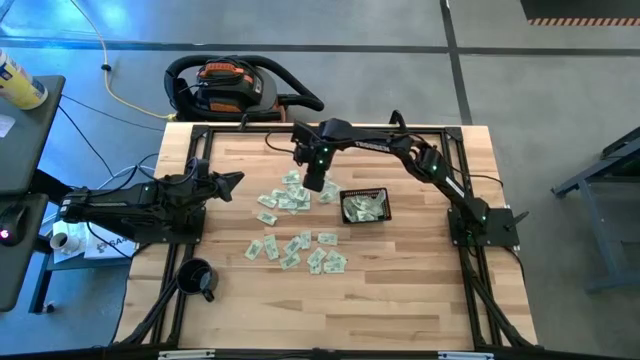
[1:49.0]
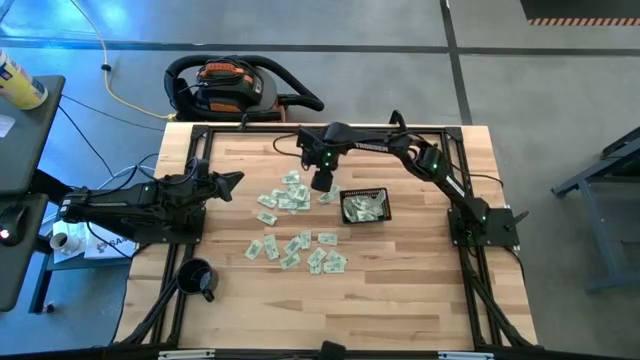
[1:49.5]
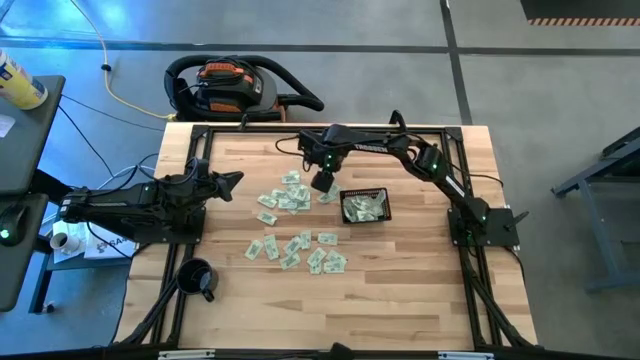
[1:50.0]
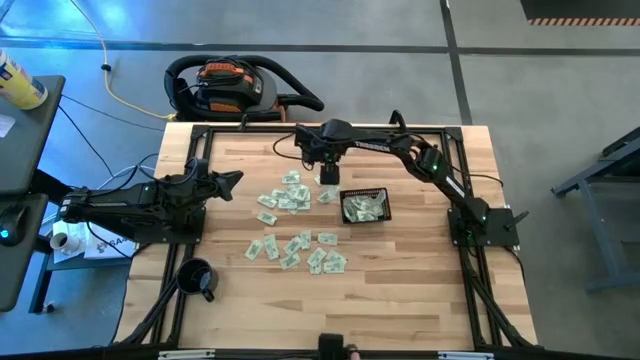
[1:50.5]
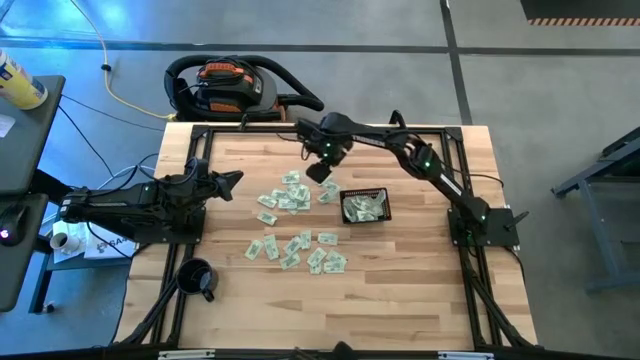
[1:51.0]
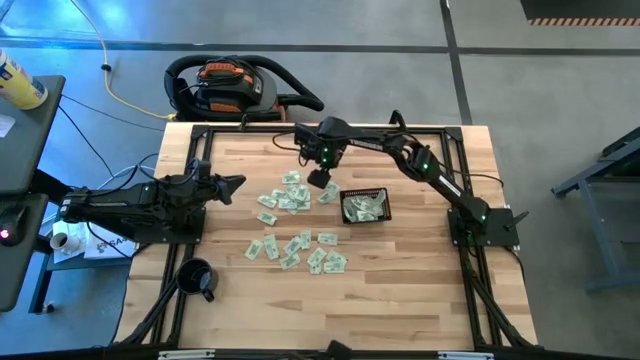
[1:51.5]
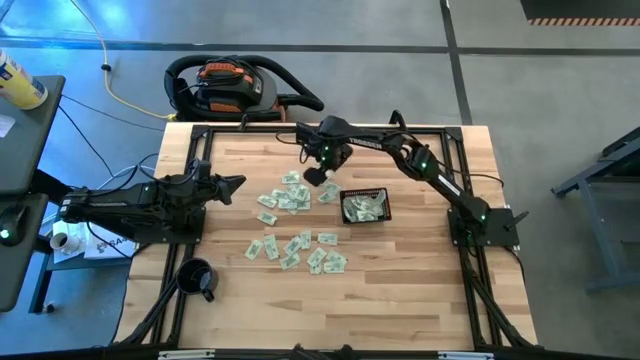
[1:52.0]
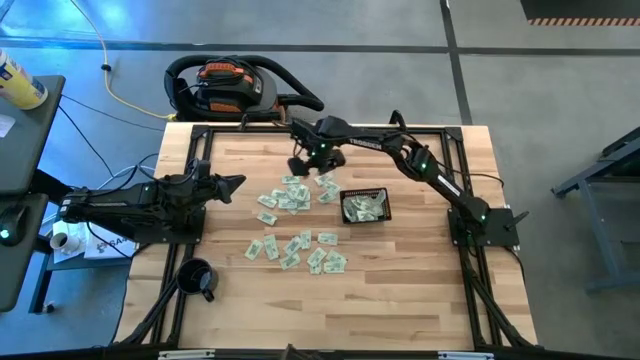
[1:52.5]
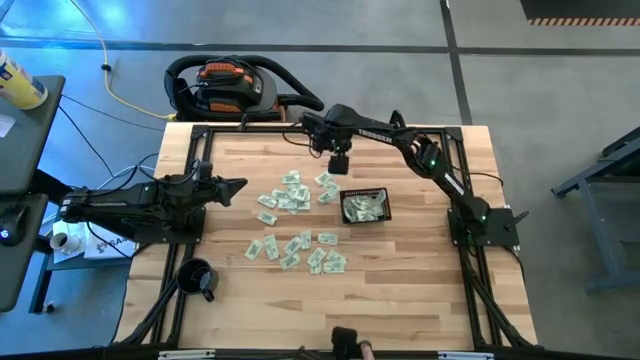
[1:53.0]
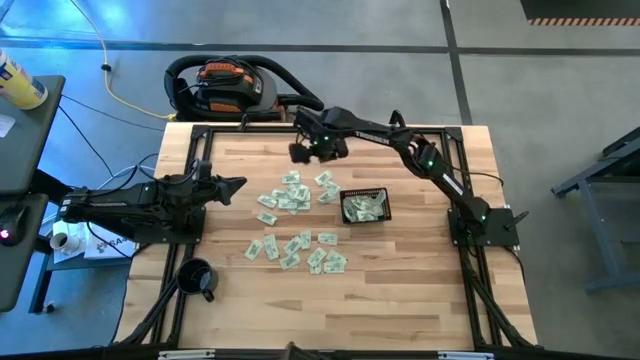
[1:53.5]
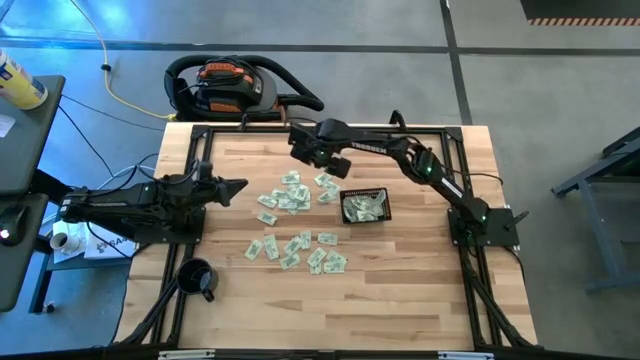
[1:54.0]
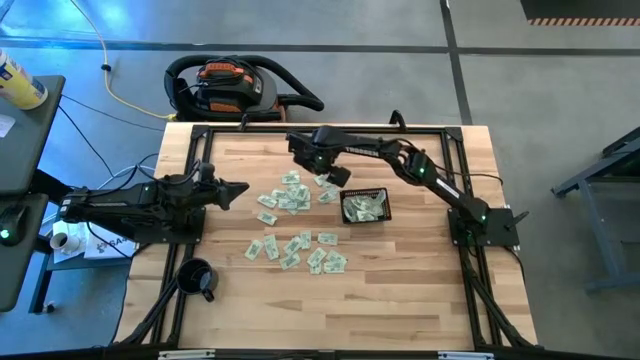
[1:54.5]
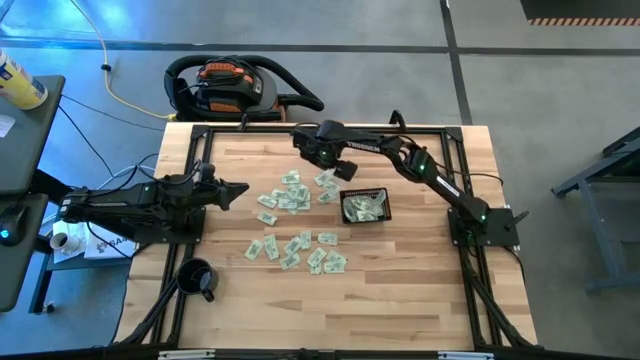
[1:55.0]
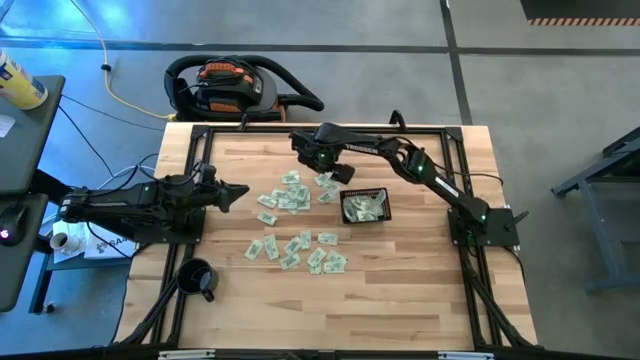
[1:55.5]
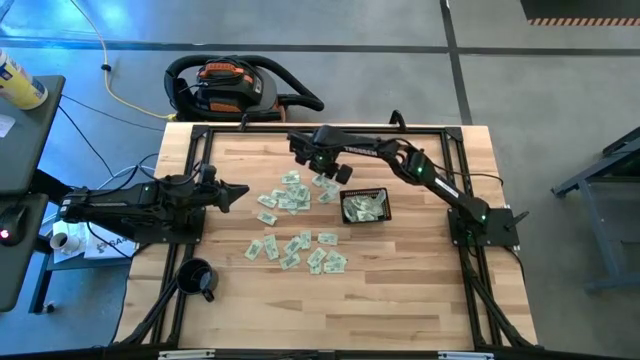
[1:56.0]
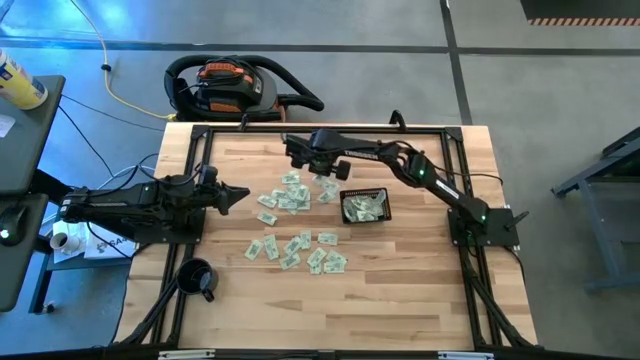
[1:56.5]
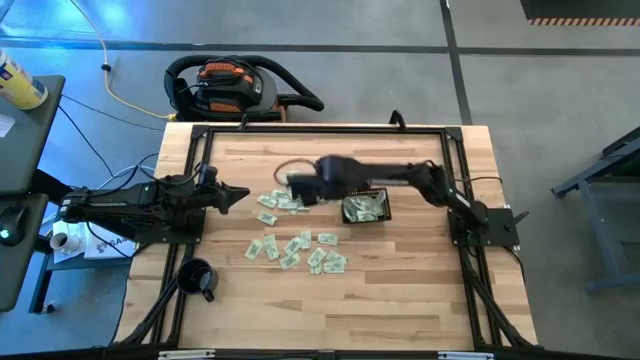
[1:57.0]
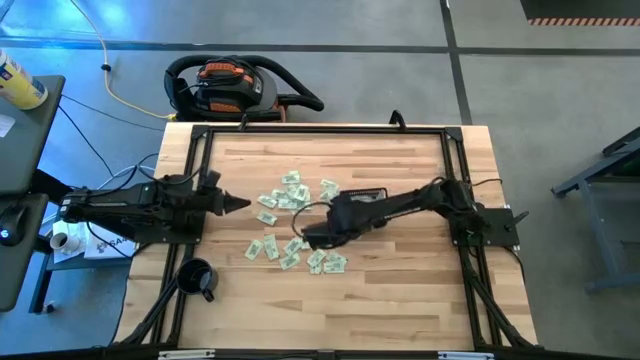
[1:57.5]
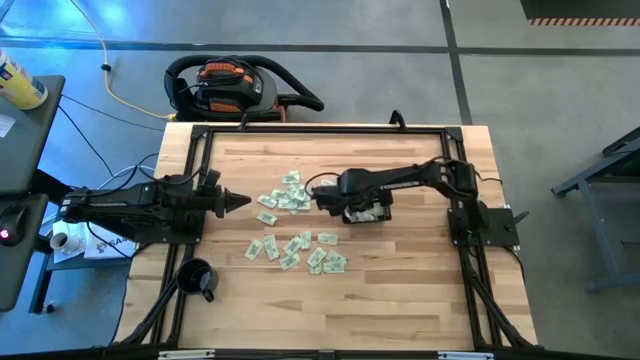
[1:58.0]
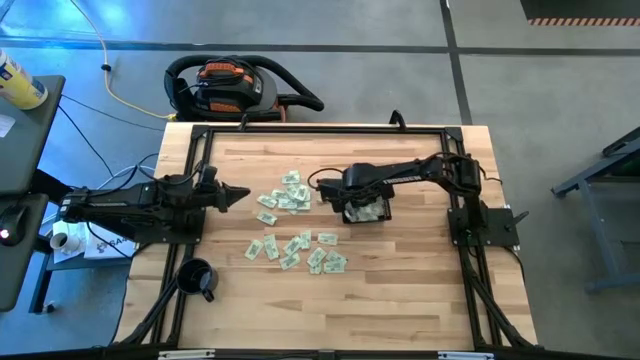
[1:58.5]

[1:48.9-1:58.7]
Task: Pick and place Stevia / Truvia into bins
Put the green stevia packet into the black bin

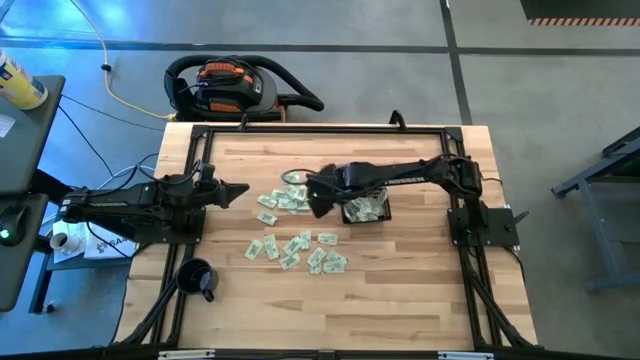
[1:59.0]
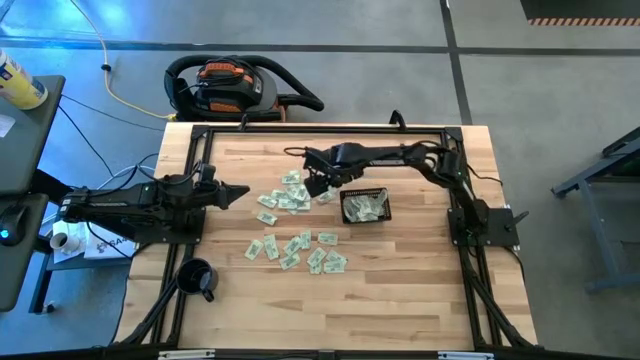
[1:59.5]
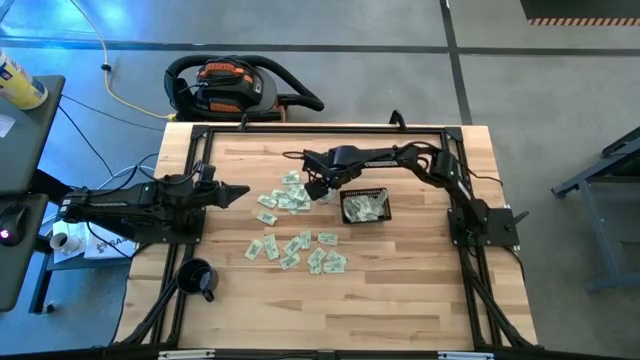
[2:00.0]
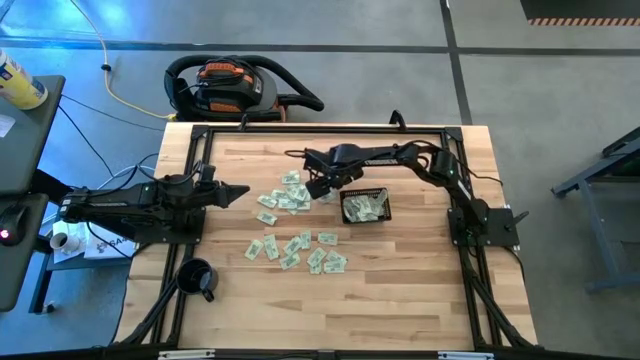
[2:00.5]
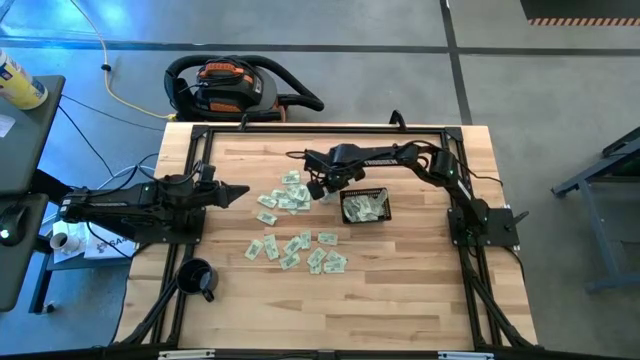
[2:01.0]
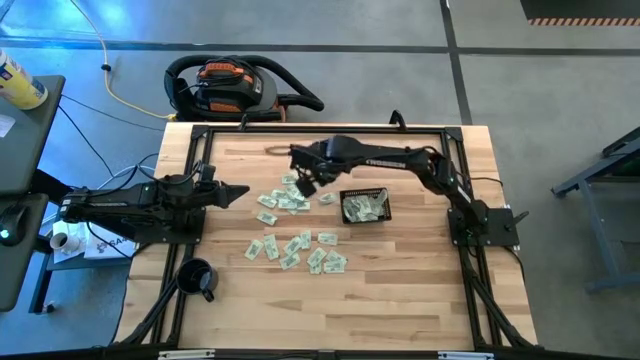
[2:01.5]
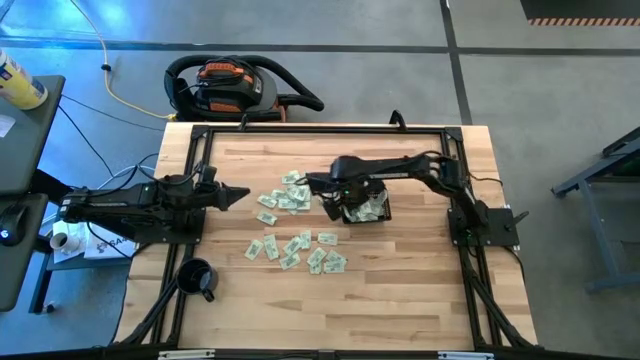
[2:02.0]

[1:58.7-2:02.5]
Put the green stevia packet into the black bin

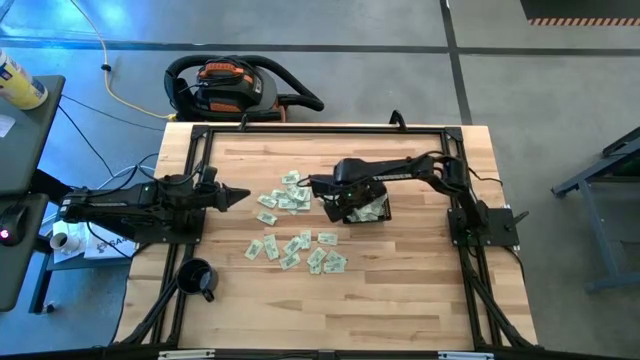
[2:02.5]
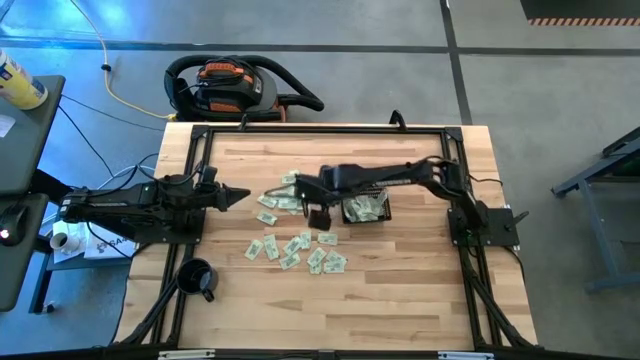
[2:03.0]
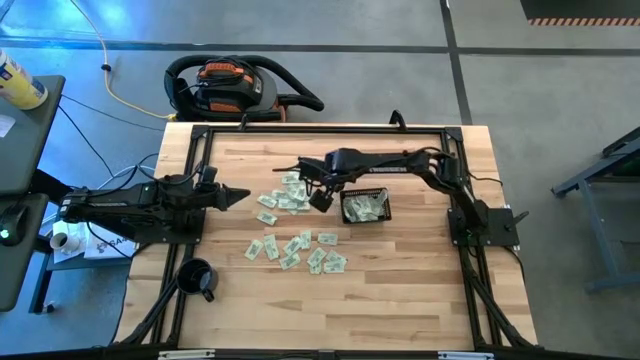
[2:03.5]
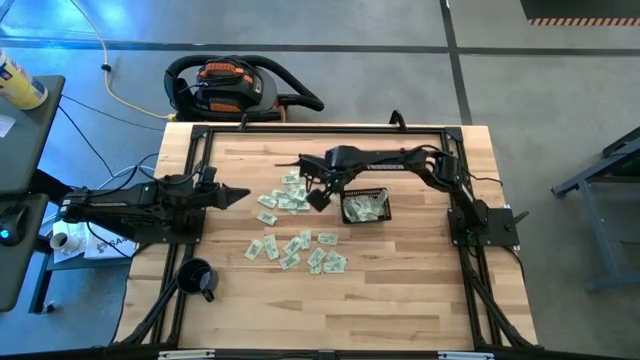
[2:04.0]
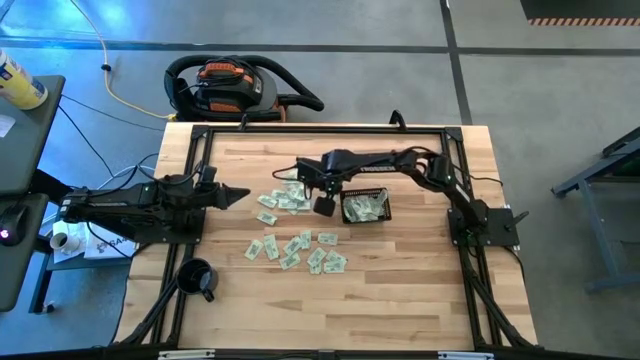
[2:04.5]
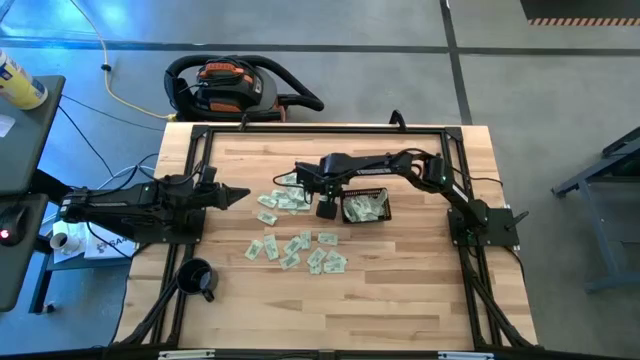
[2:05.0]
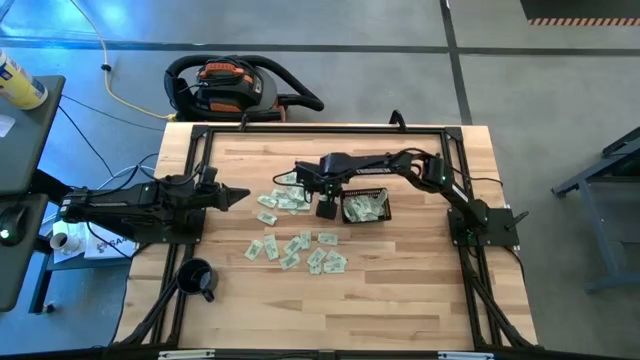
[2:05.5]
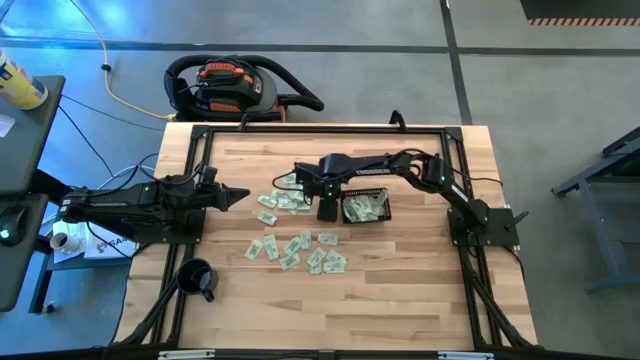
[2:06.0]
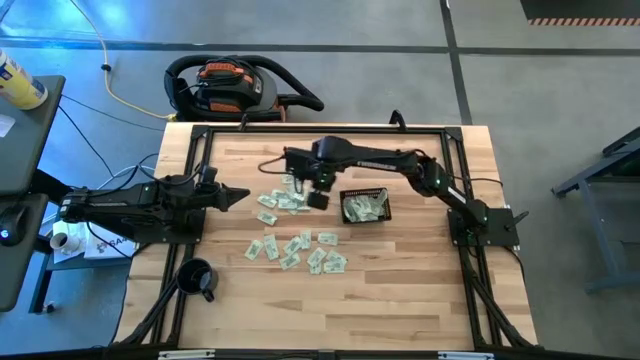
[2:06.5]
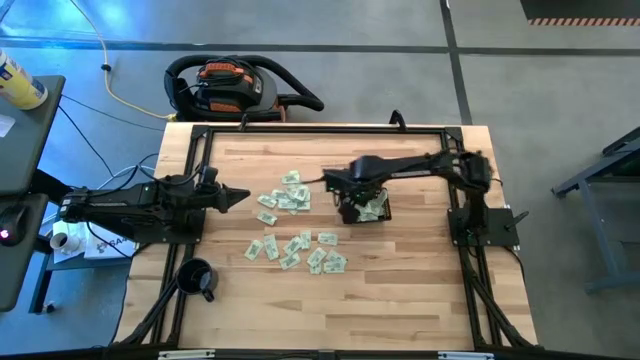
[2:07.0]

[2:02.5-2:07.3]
Put the green stevia packet into the black bin

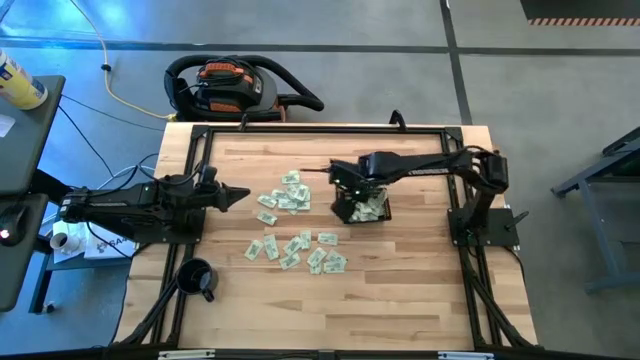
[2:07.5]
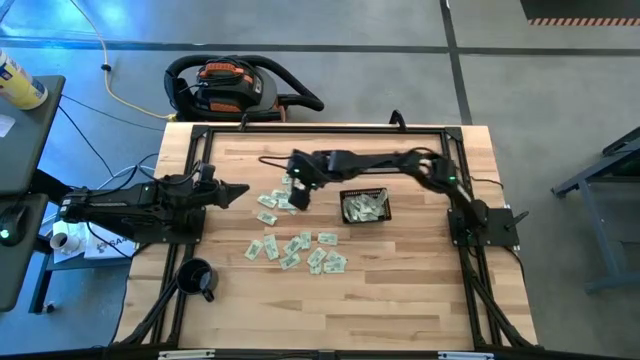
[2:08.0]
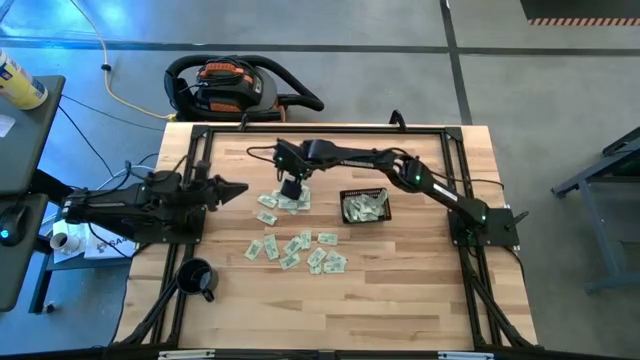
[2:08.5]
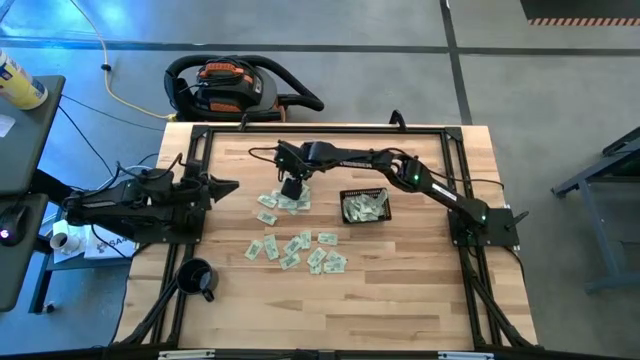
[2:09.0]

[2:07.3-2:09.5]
Put the green stevia packet into the black bin

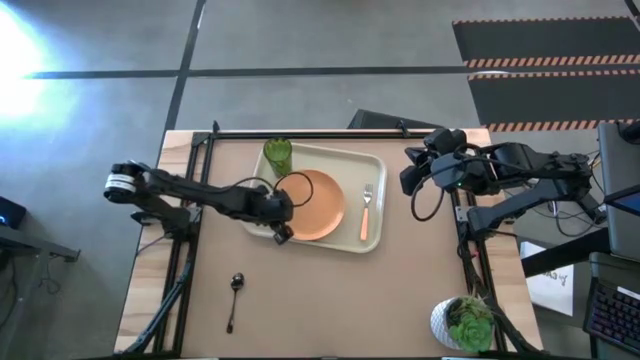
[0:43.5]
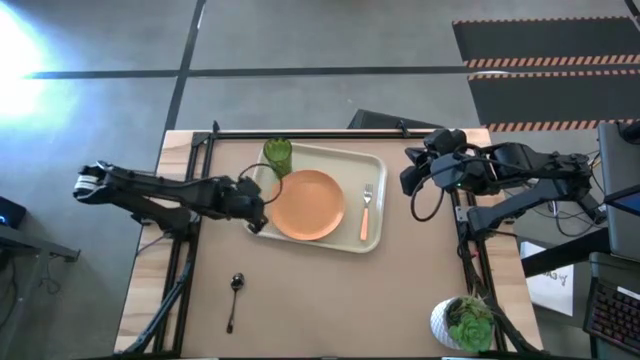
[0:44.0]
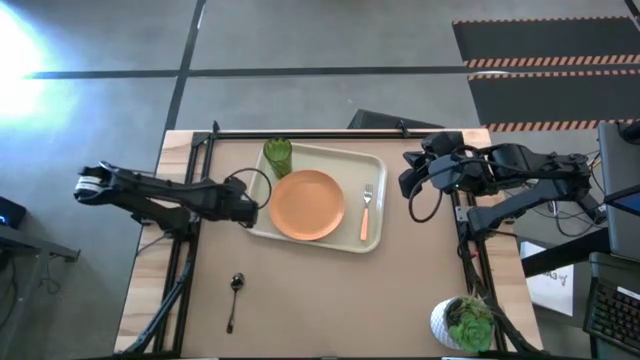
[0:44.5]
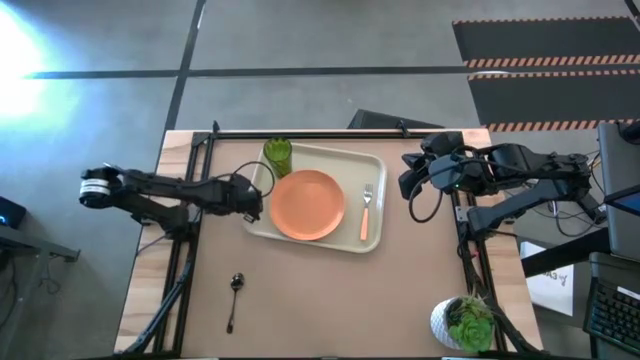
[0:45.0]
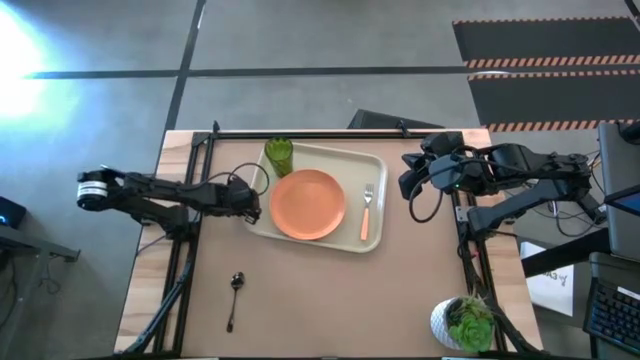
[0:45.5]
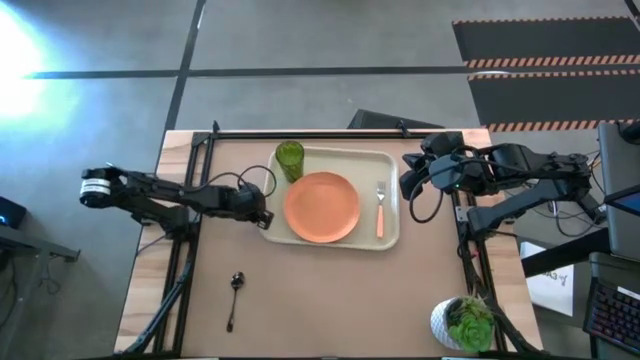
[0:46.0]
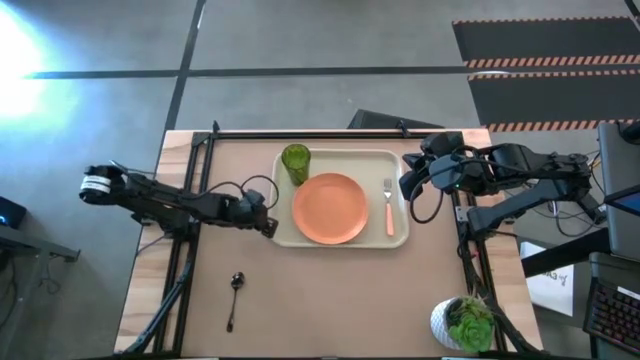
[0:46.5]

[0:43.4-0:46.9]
Task: Pick and place plate/cup/fork/spoon on tray
Adjust the light brown serving tray
